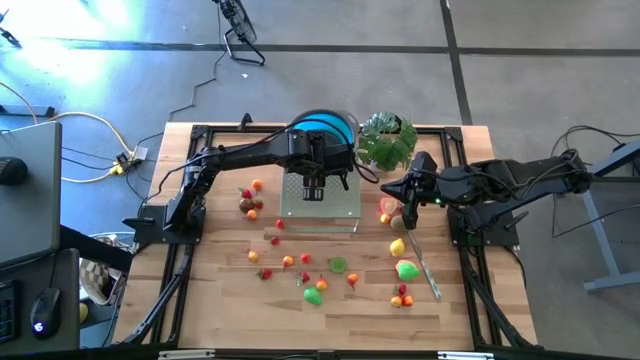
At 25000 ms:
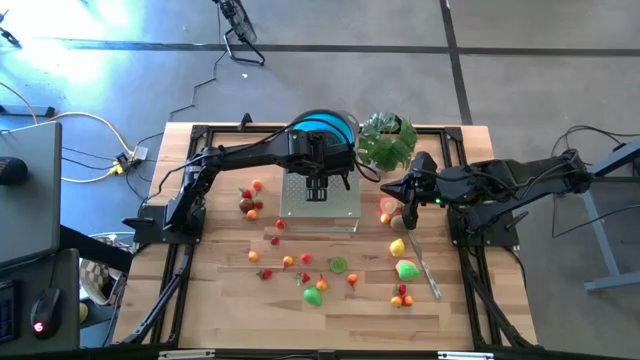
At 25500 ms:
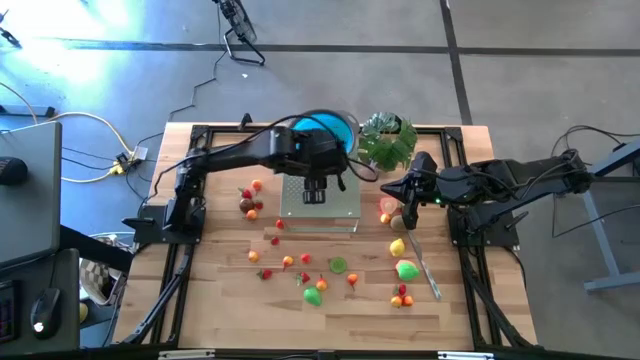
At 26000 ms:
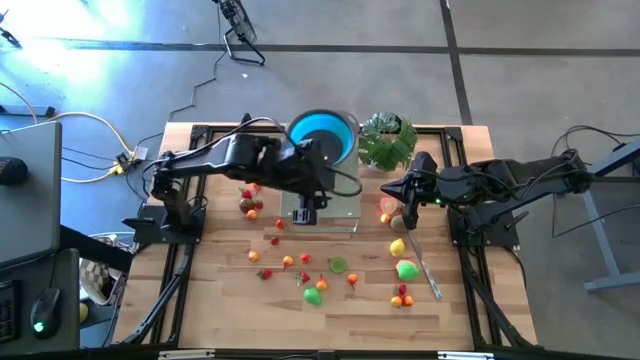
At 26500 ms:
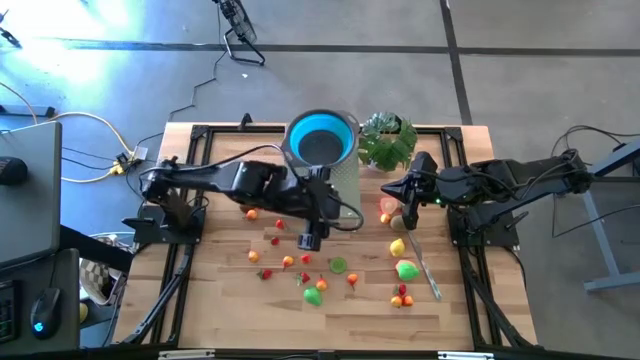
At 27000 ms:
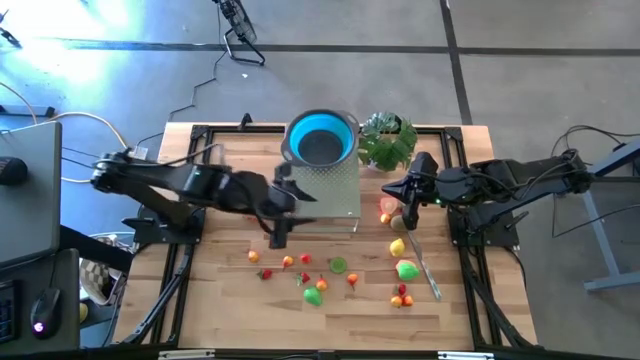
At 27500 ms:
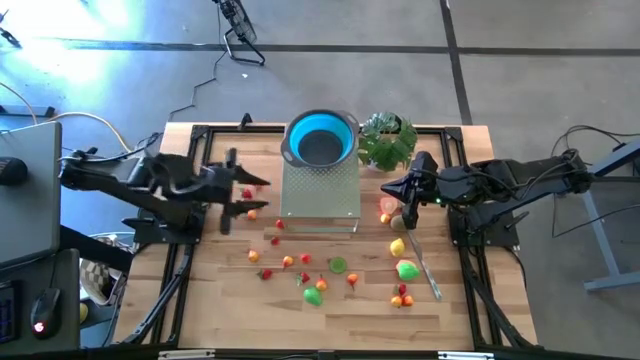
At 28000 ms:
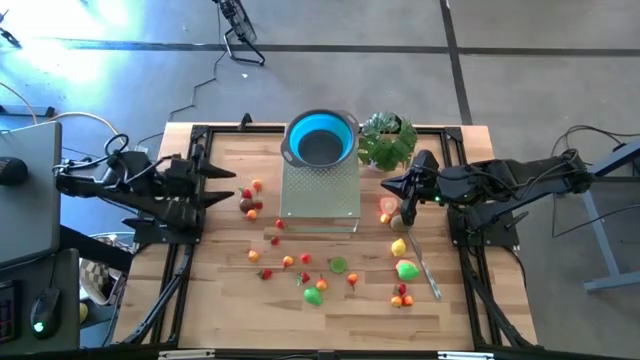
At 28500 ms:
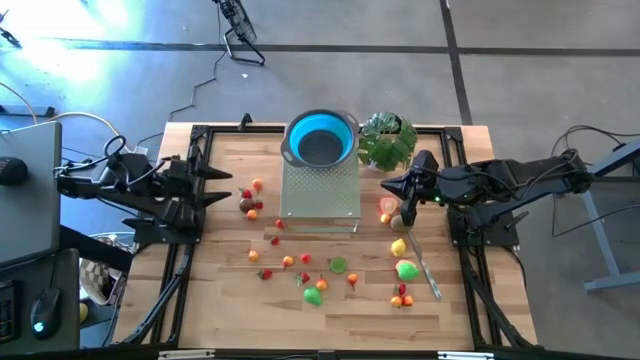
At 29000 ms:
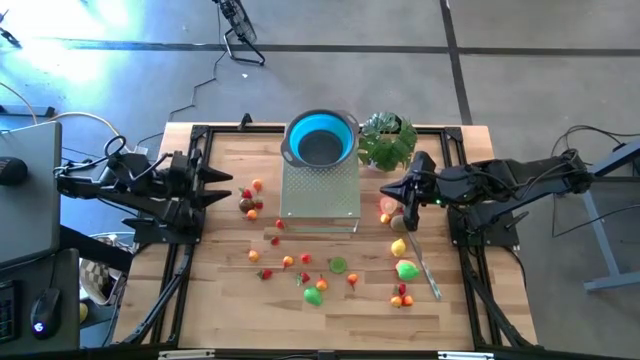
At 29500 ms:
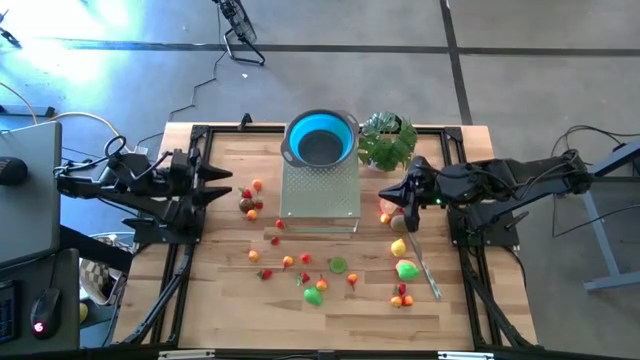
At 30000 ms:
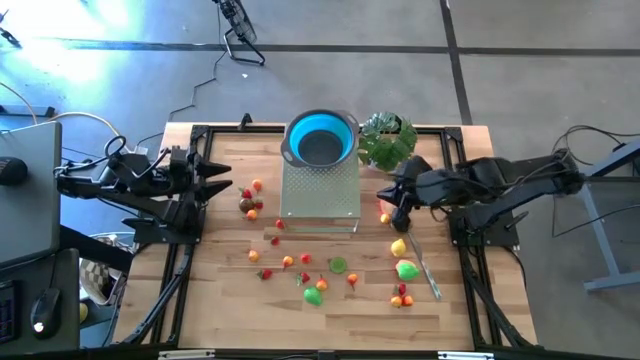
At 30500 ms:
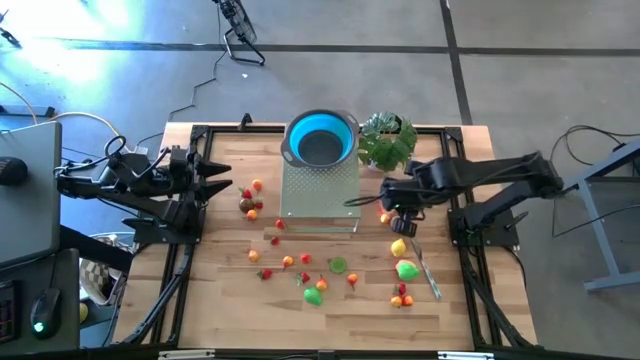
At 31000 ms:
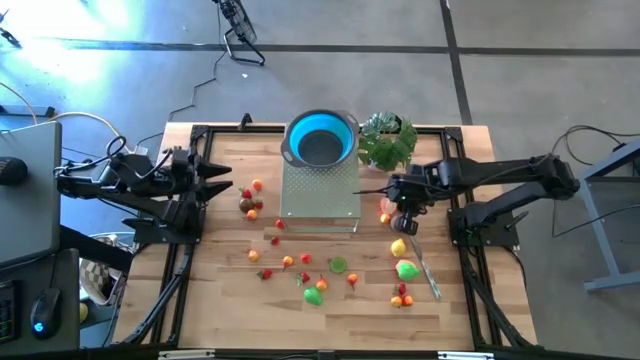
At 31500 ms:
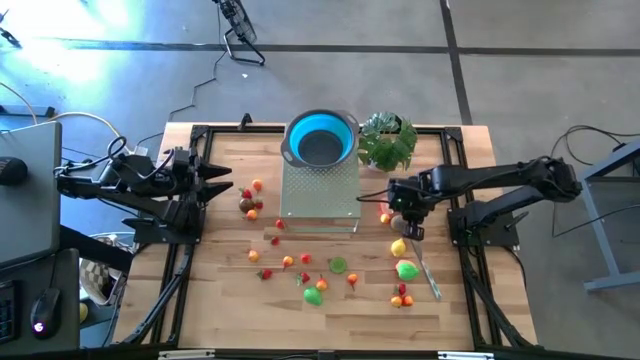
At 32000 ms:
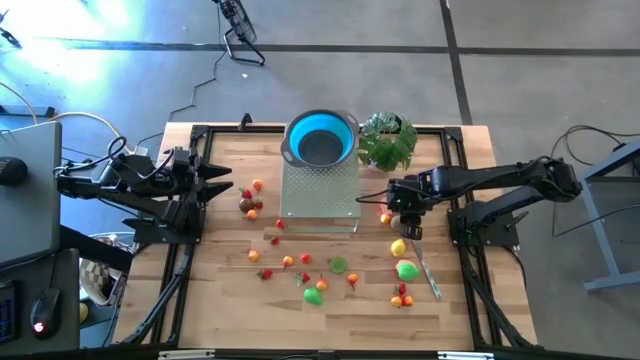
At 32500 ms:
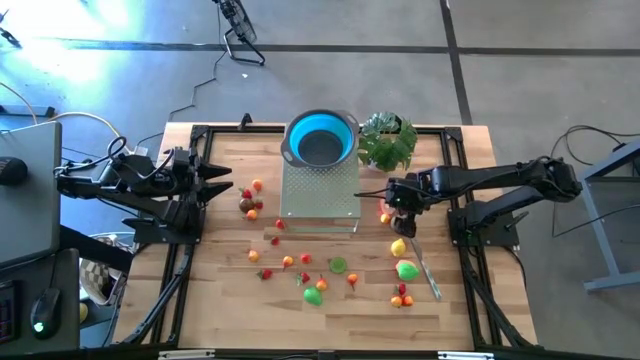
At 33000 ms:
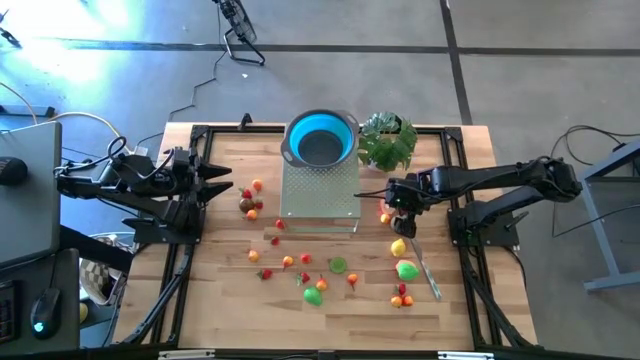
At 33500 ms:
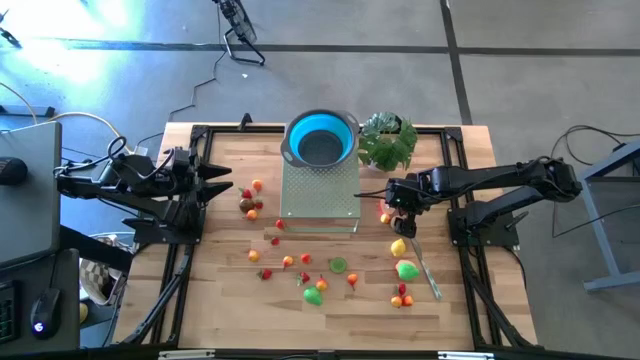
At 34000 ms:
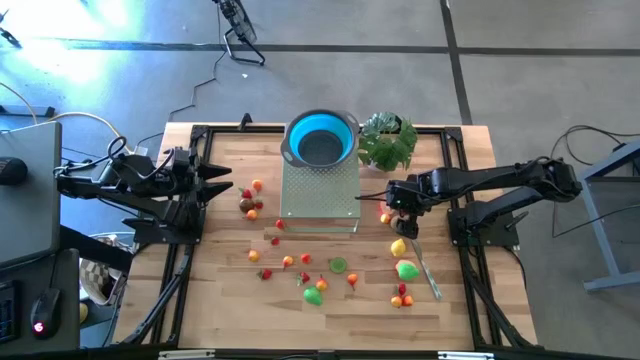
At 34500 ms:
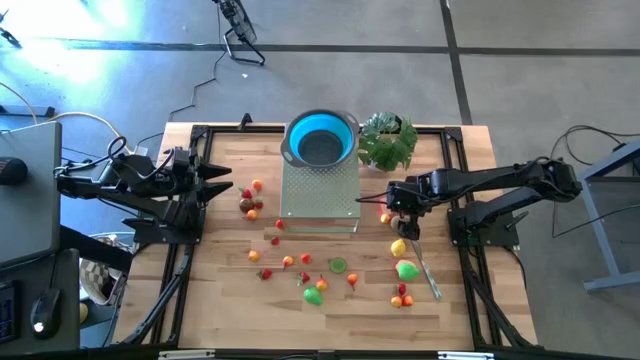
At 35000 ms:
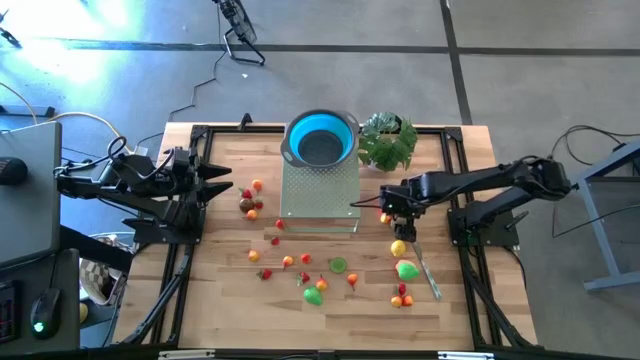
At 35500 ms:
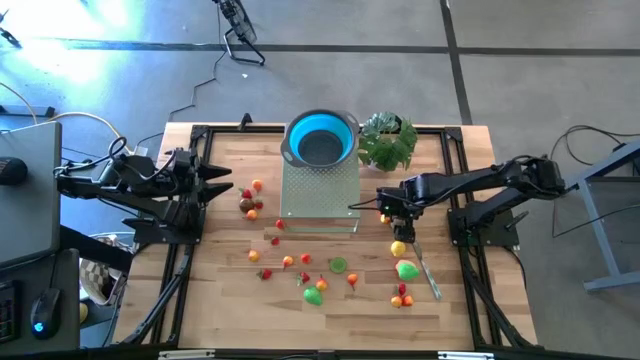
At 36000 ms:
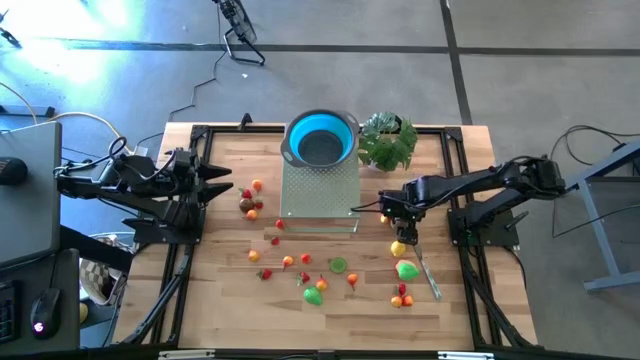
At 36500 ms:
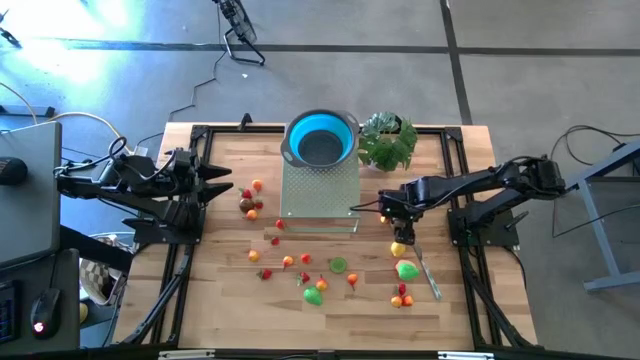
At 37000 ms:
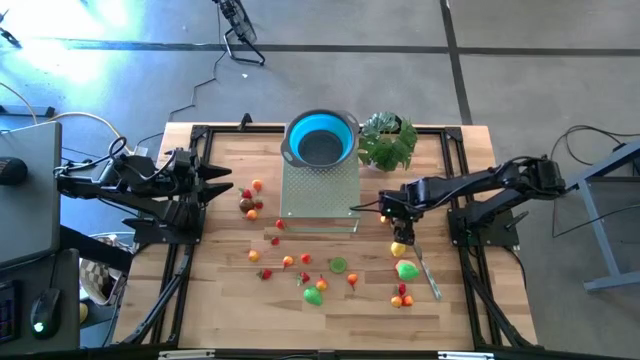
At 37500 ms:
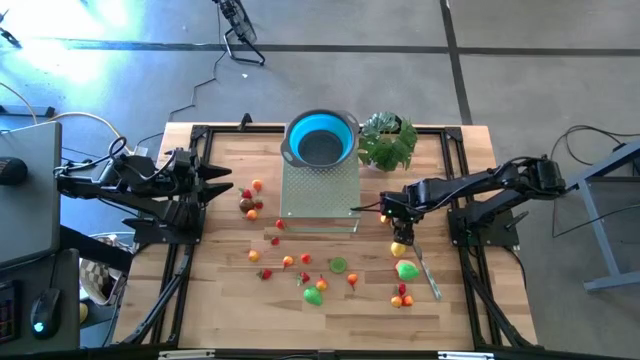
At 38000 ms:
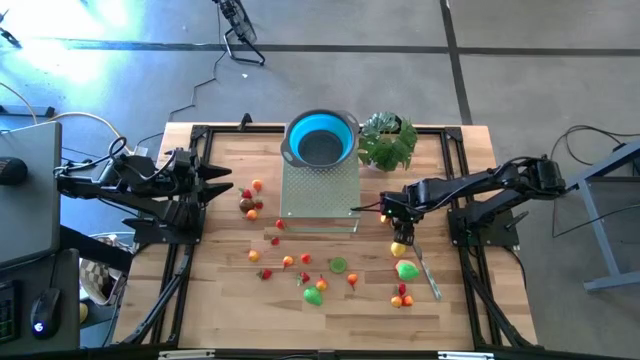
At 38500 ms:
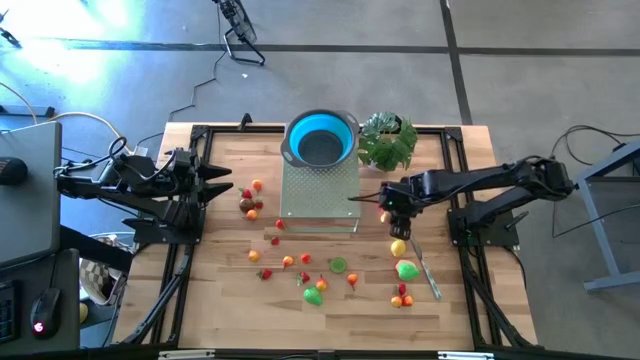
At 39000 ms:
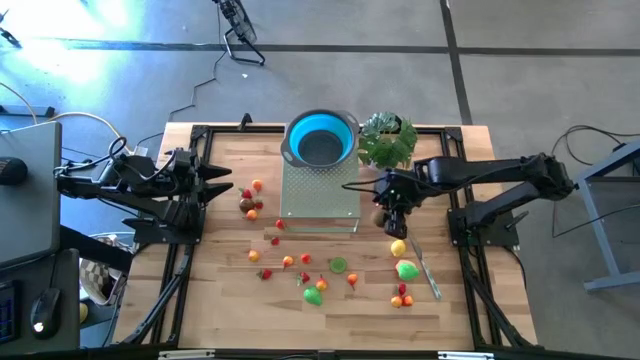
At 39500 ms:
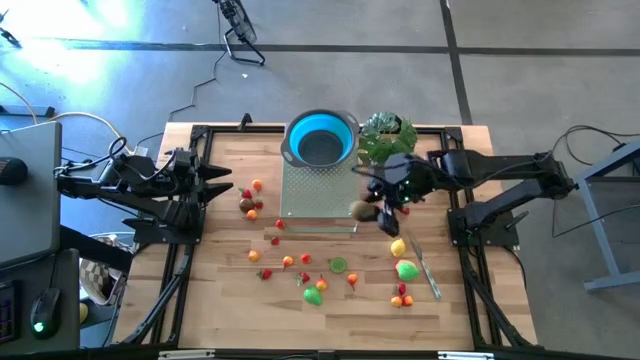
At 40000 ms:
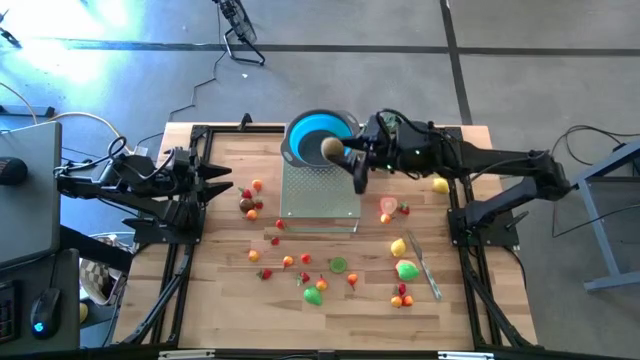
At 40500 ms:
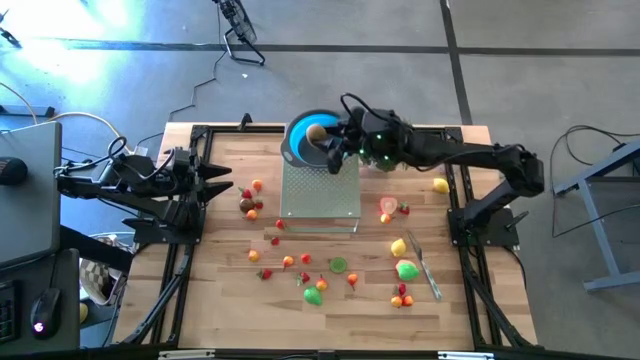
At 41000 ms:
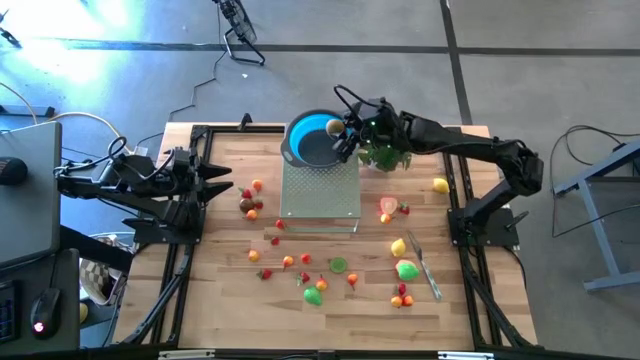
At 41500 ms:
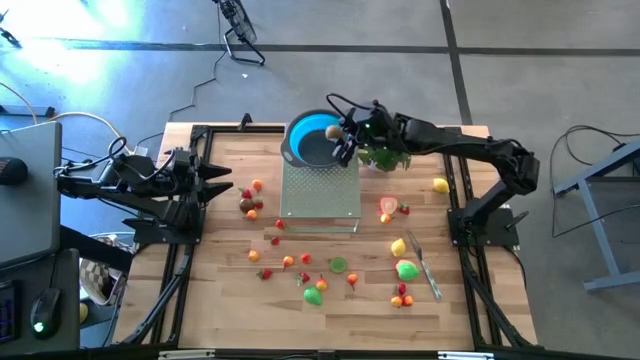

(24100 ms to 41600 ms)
Task: Pick & Place Fruit
Put the brown kiwi in the blue bowl on the shelf

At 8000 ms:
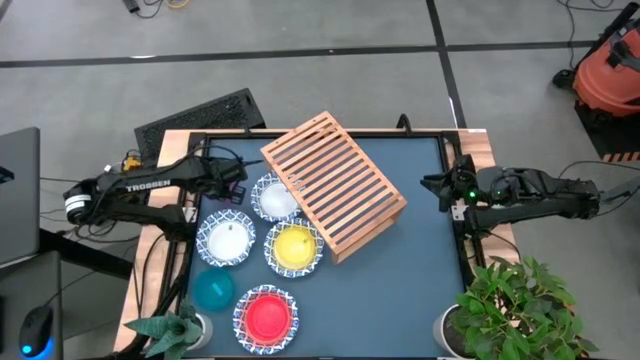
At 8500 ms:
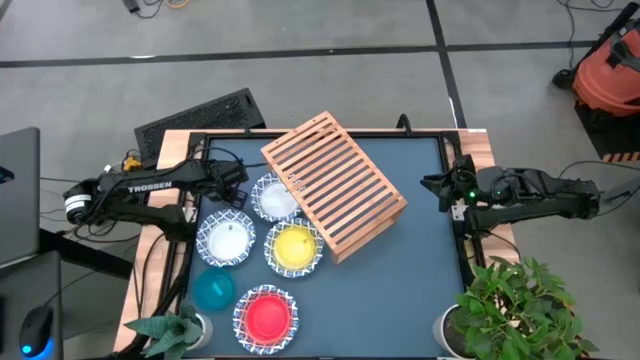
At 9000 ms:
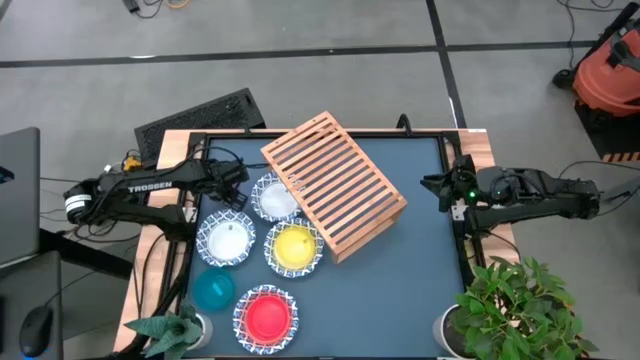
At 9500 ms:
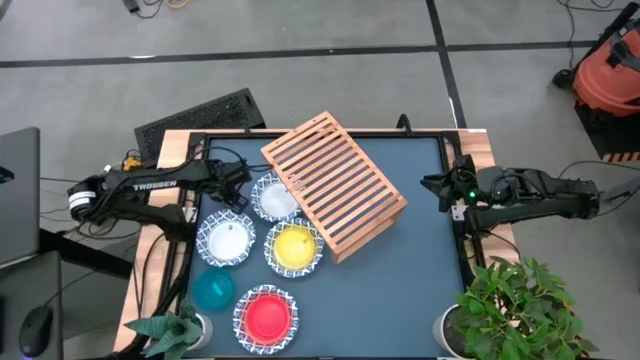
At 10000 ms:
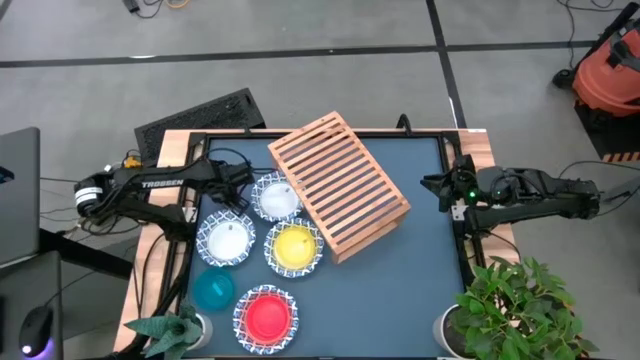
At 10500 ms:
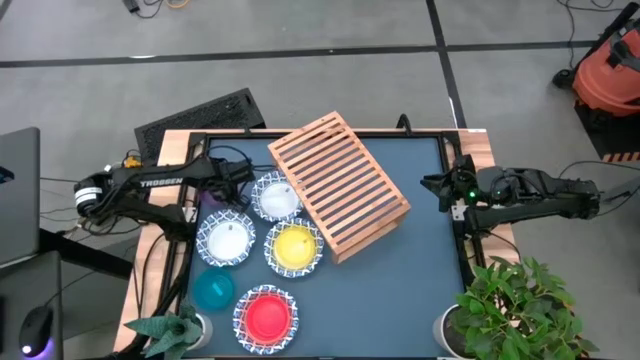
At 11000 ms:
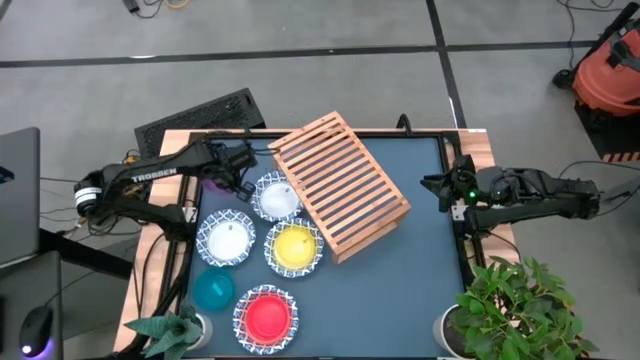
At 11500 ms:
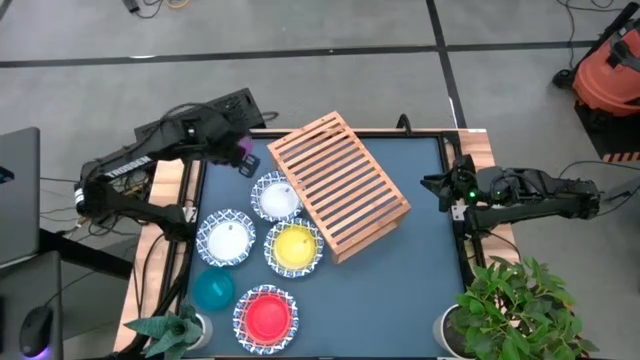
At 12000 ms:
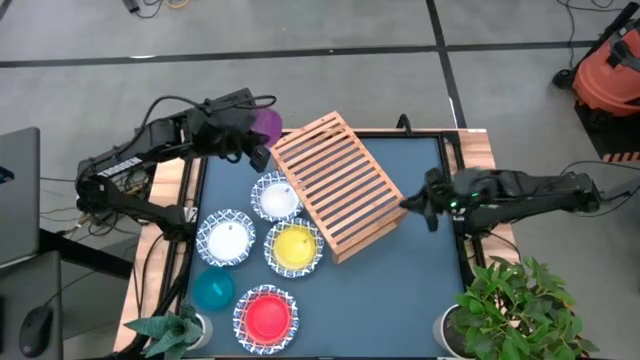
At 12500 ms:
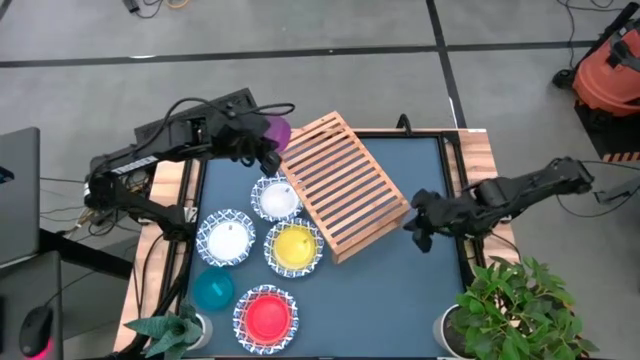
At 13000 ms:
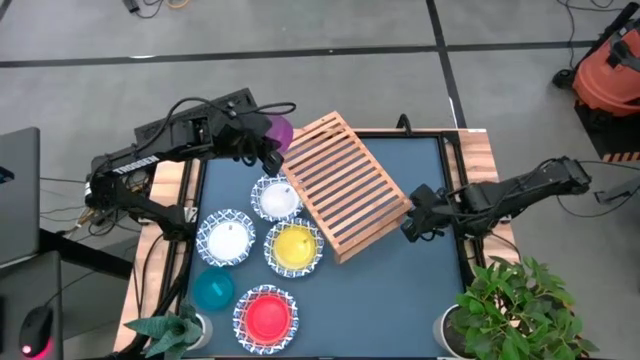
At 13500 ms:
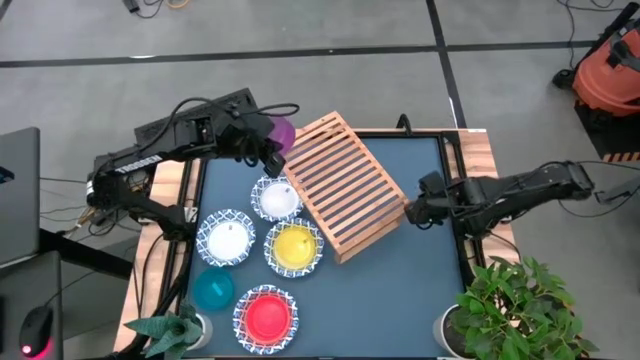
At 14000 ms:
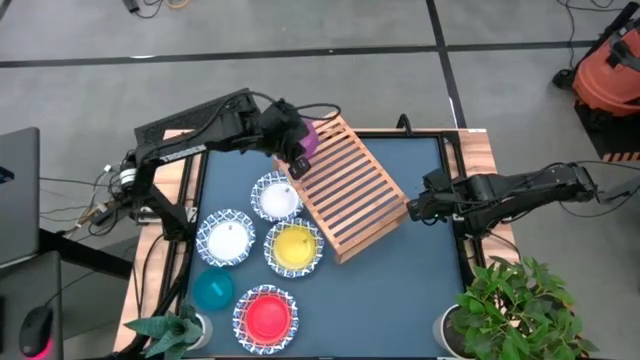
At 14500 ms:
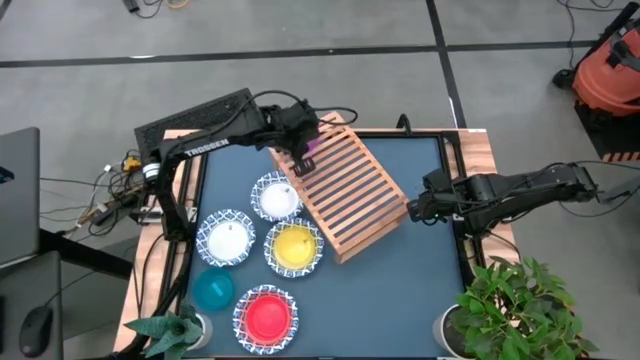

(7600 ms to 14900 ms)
Task: Place and stack bowls onto a shelf
Put the violet bowl on the shelf
